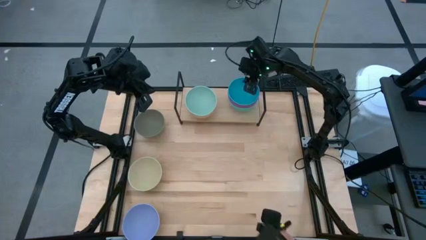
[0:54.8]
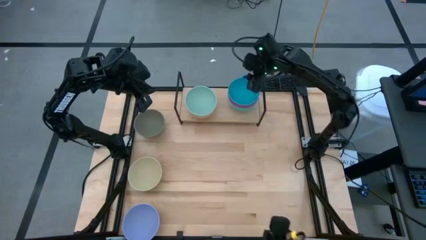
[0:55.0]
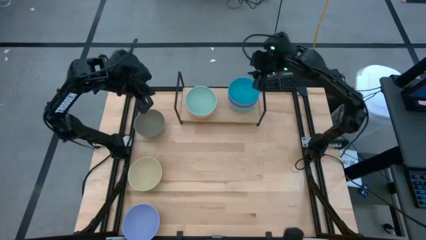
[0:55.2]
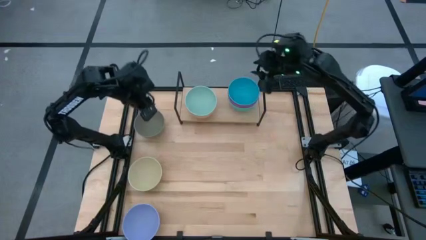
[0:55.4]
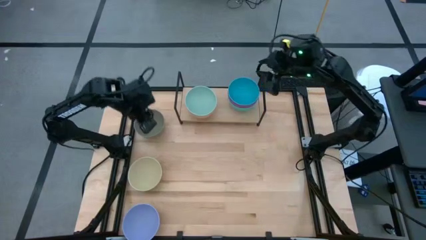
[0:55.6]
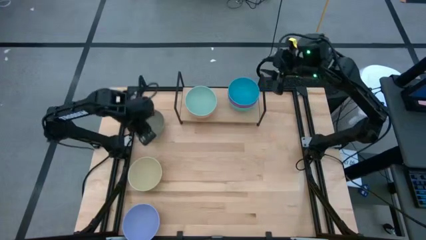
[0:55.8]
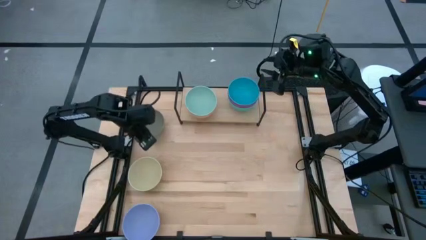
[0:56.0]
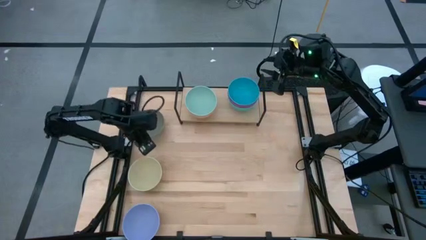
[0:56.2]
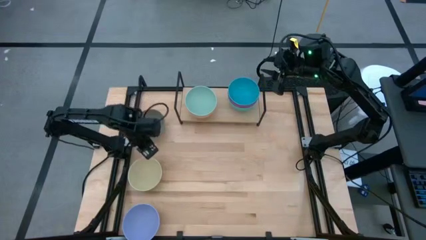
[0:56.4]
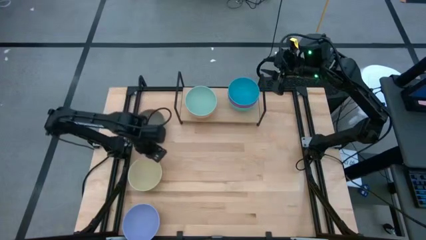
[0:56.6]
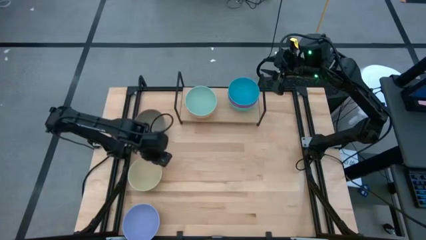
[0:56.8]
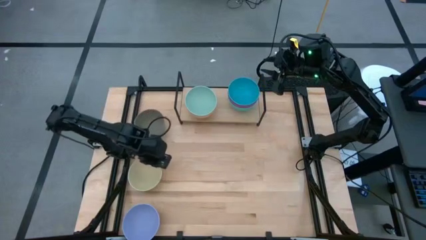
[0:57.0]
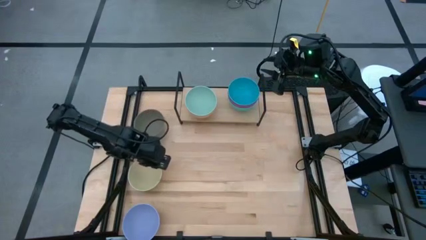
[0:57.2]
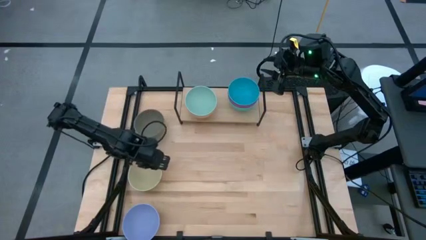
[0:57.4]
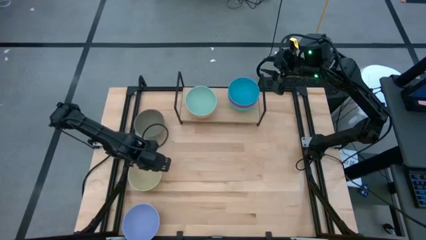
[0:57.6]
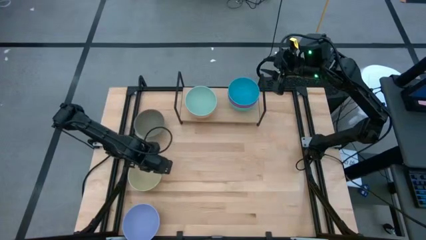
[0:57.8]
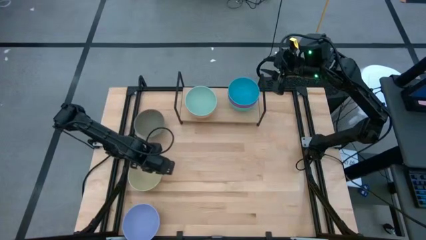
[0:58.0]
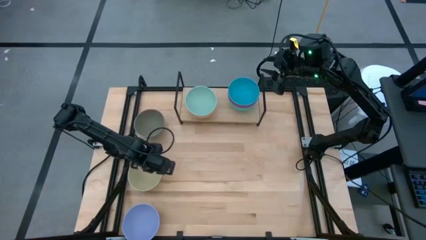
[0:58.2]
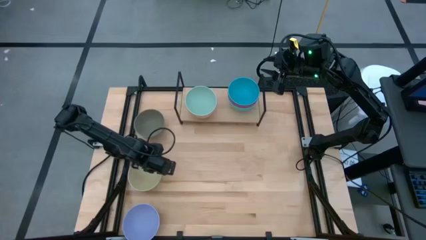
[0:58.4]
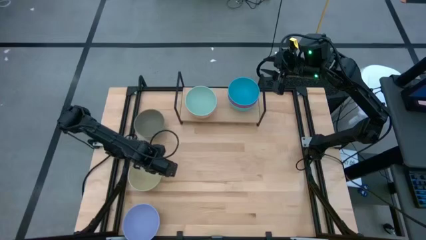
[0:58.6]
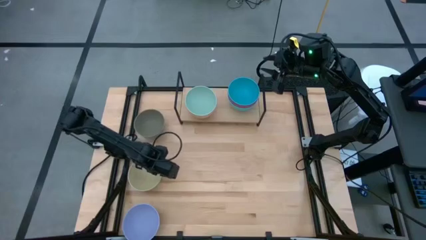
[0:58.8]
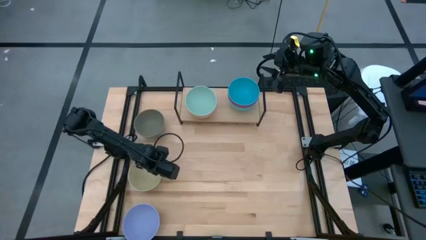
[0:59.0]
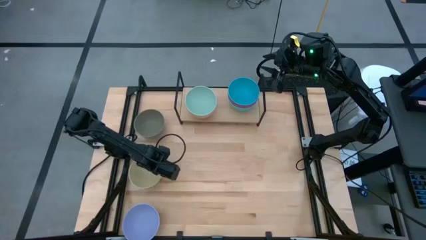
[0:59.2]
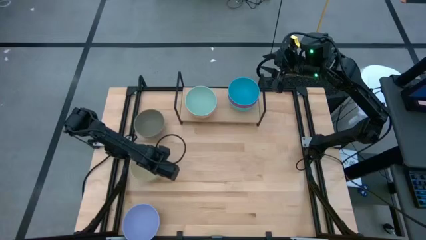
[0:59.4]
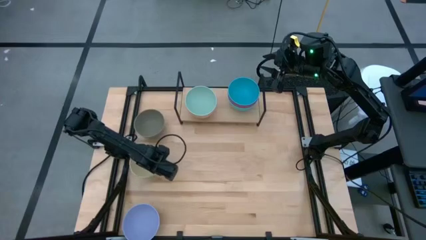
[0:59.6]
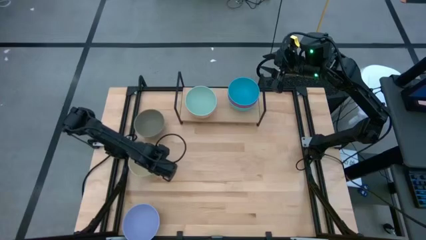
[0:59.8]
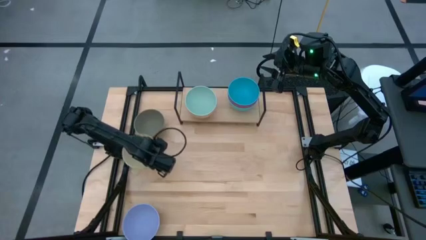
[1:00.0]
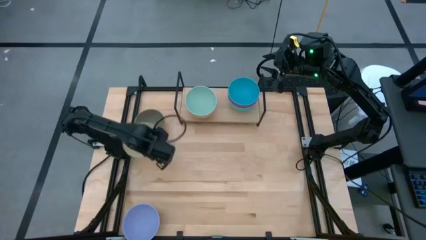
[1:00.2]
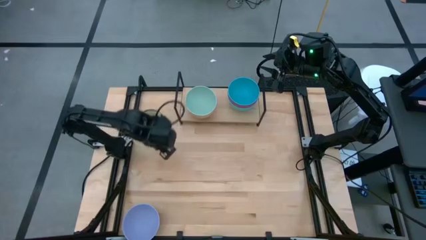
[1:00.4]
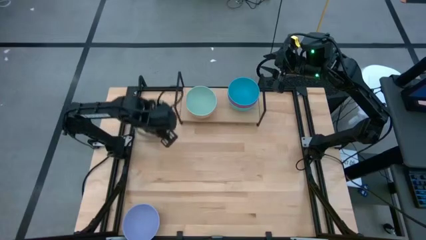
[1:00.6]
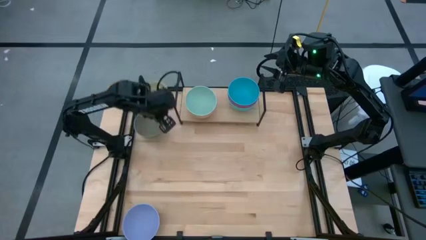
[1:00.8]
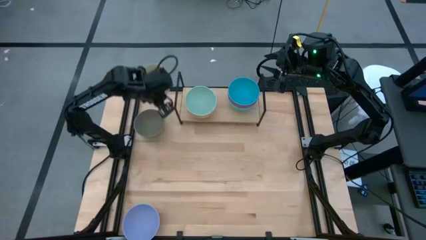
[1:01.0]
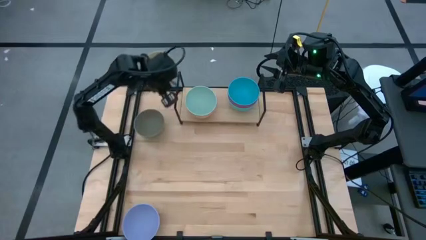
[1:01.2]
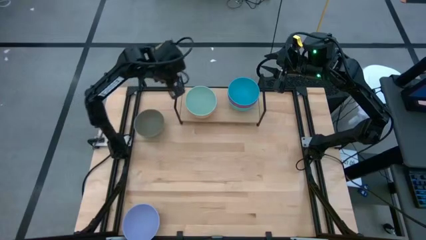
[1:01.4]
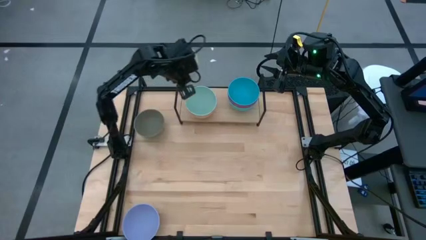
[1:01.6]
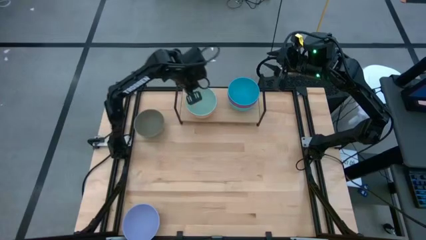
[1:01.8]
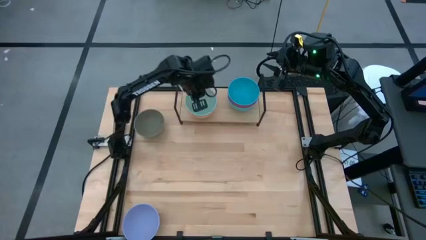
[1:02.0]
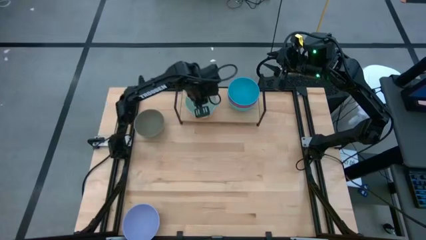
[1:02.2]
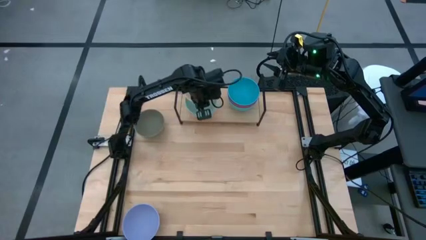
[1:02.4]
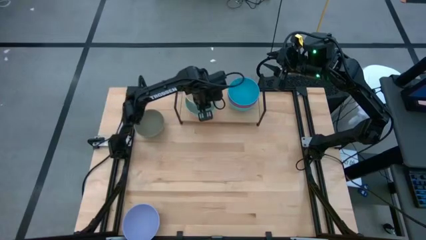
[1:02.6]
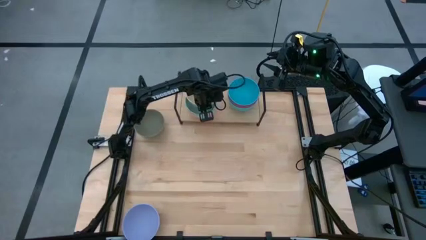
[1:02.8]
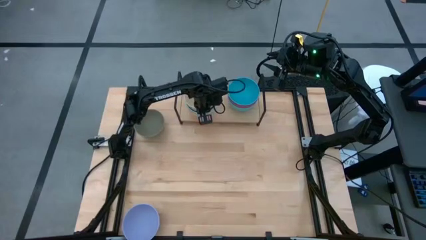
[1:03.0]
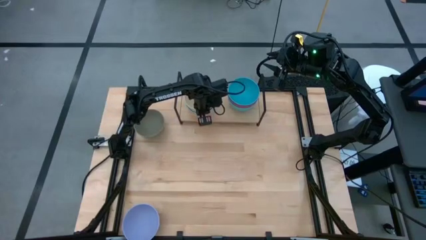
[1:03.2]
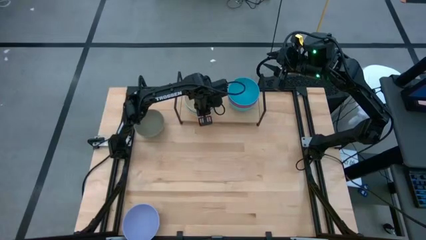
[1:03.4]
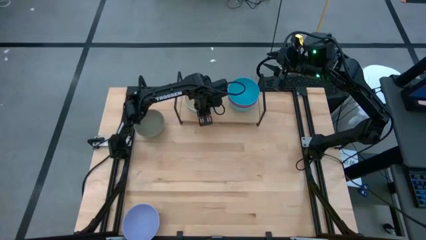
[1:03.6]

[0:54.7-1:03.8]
Task: Place and stack bowls onto a shelf
Stack the brown bowl on top of the light green bowl on the shelf
